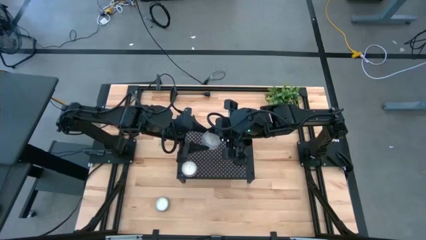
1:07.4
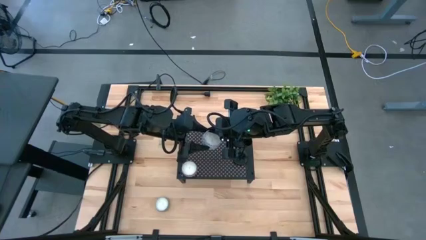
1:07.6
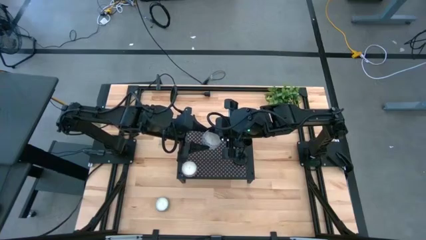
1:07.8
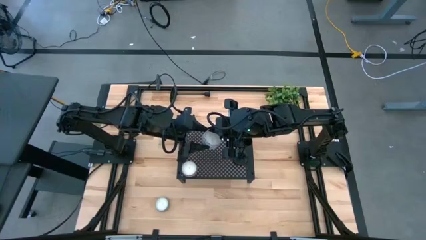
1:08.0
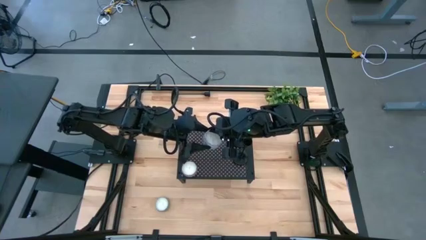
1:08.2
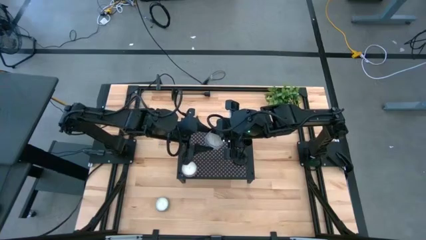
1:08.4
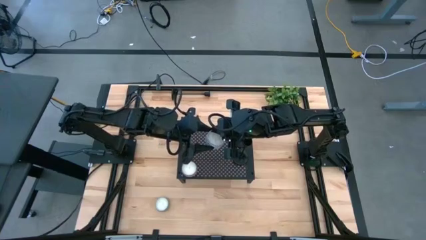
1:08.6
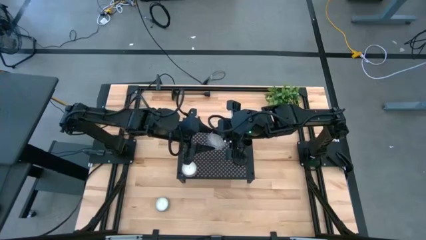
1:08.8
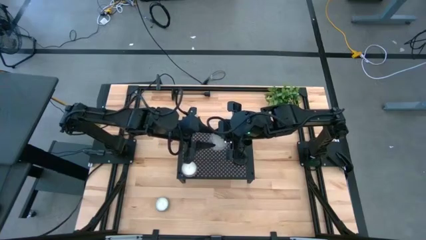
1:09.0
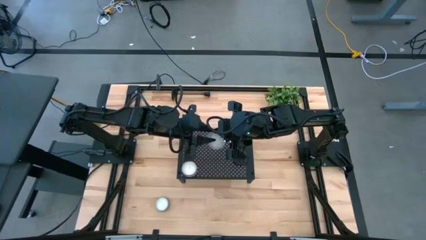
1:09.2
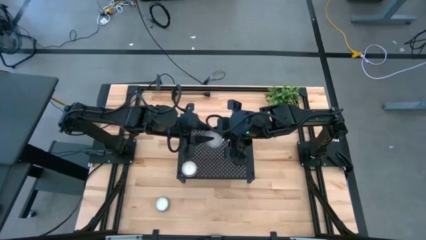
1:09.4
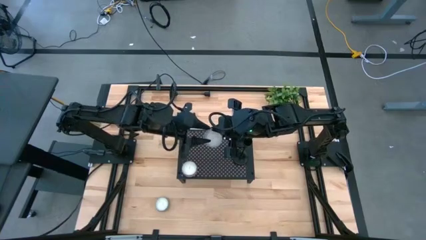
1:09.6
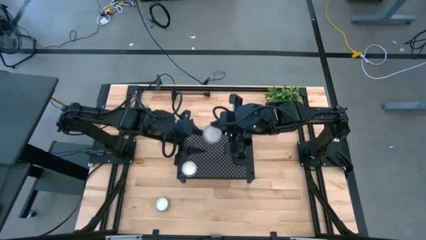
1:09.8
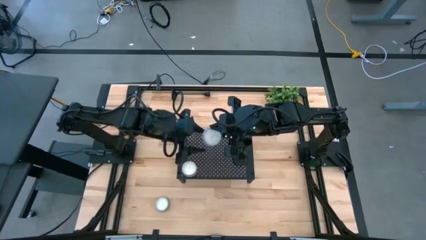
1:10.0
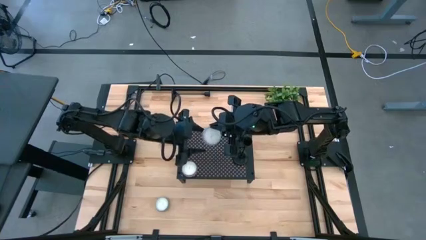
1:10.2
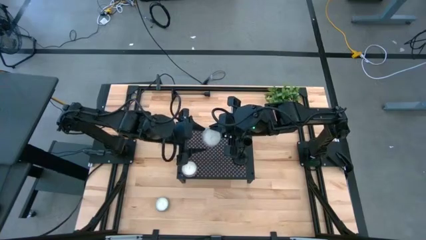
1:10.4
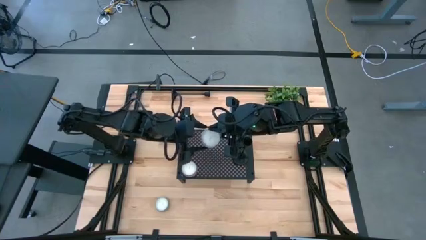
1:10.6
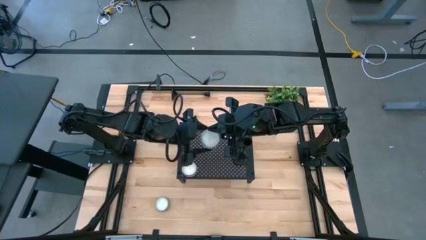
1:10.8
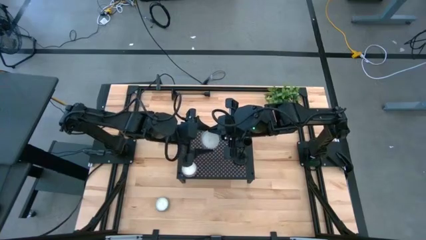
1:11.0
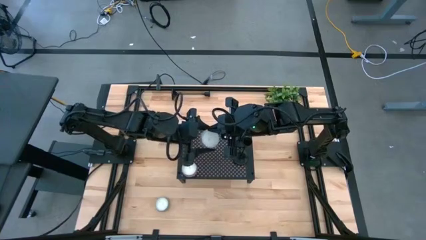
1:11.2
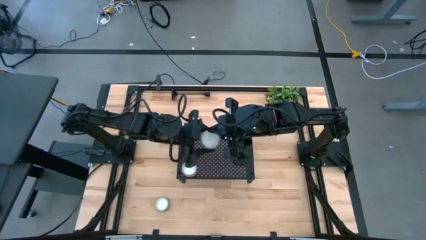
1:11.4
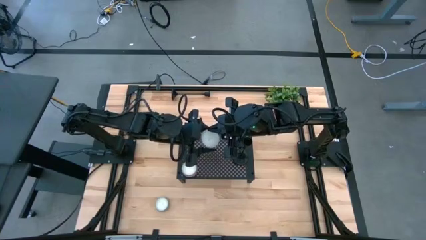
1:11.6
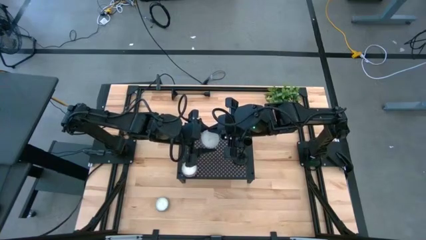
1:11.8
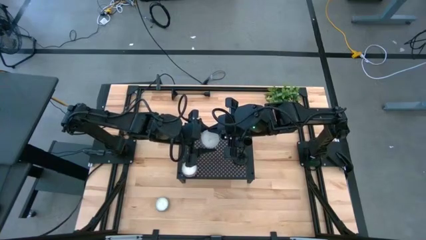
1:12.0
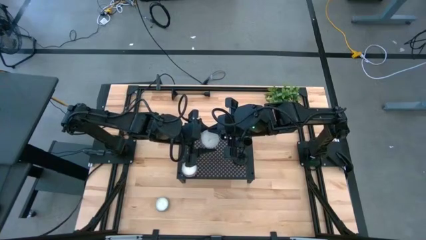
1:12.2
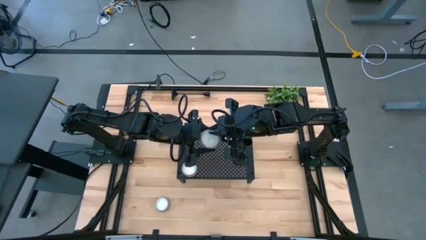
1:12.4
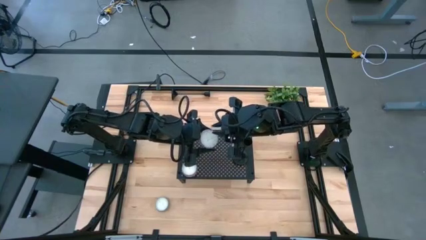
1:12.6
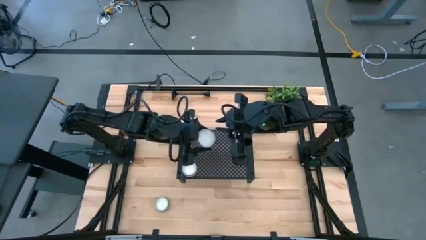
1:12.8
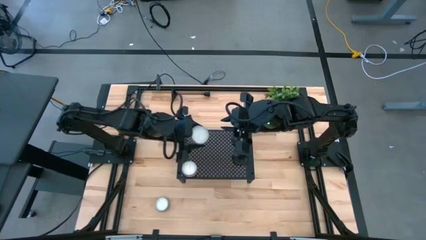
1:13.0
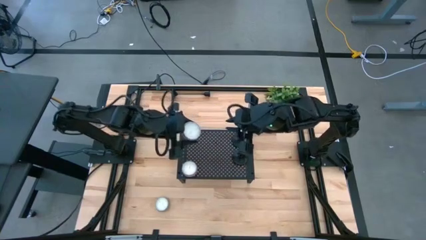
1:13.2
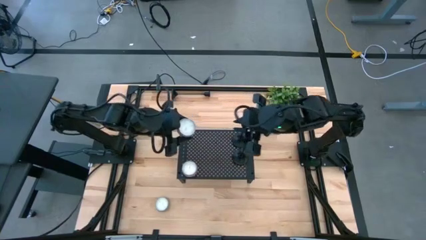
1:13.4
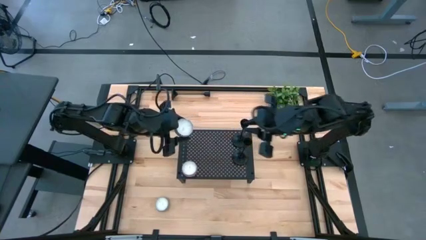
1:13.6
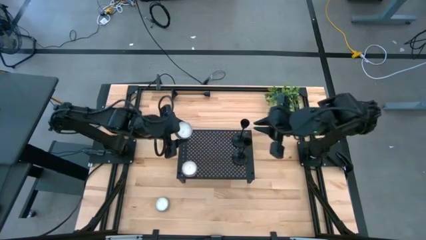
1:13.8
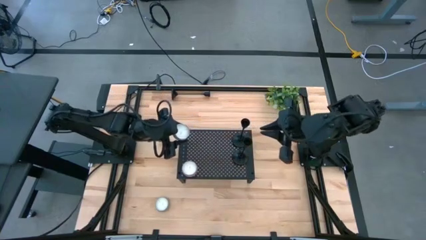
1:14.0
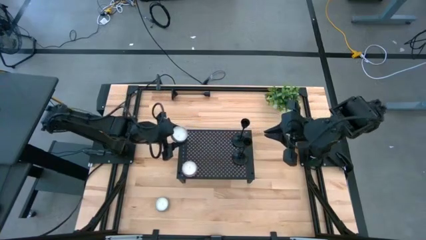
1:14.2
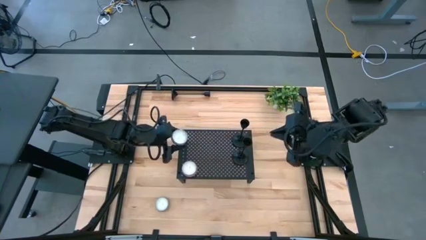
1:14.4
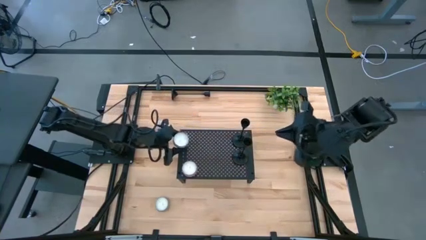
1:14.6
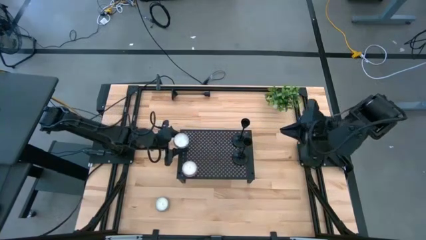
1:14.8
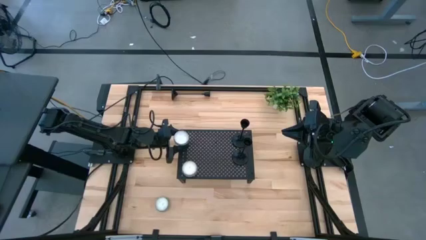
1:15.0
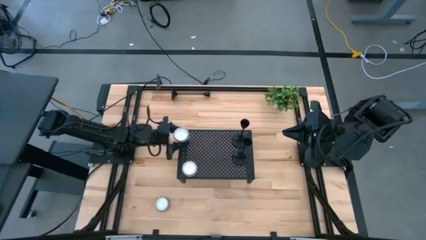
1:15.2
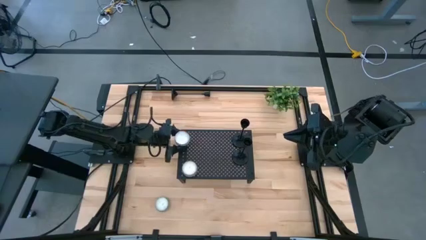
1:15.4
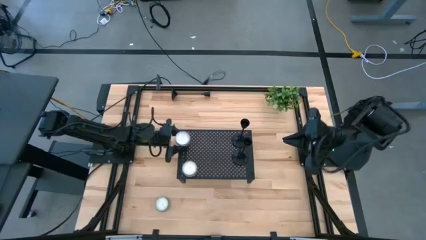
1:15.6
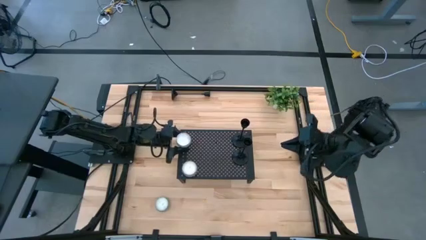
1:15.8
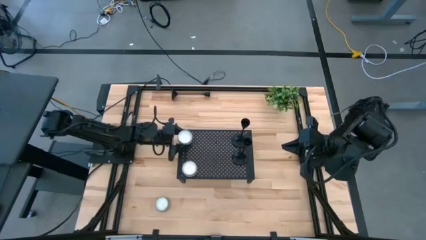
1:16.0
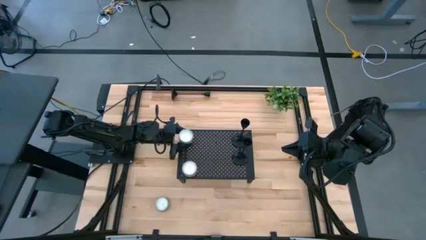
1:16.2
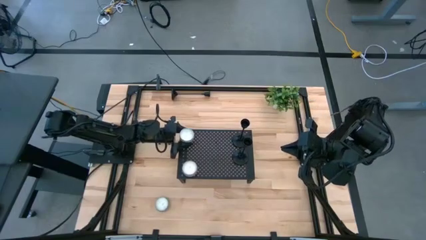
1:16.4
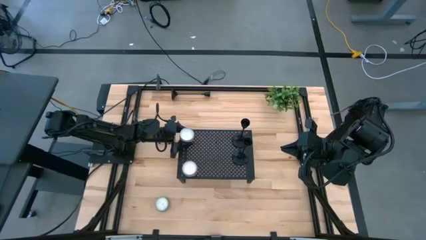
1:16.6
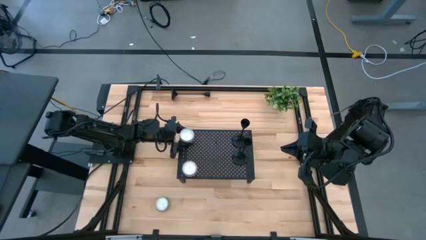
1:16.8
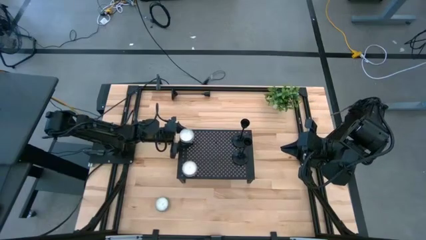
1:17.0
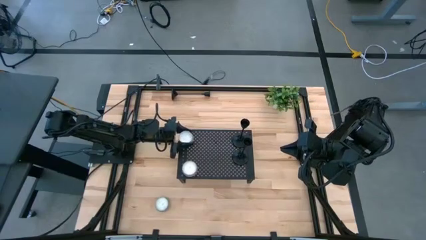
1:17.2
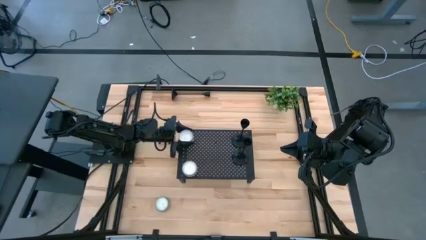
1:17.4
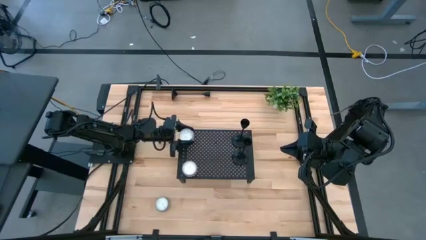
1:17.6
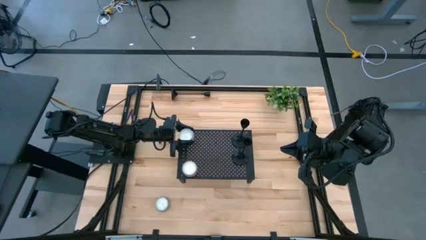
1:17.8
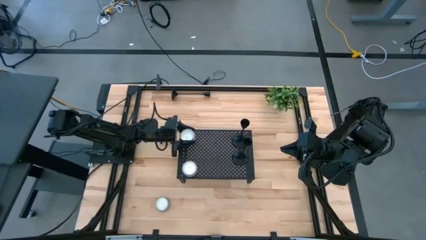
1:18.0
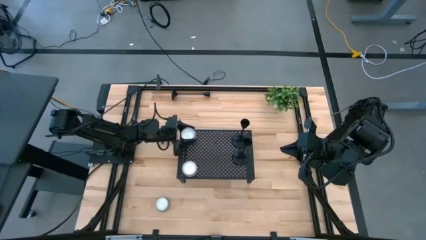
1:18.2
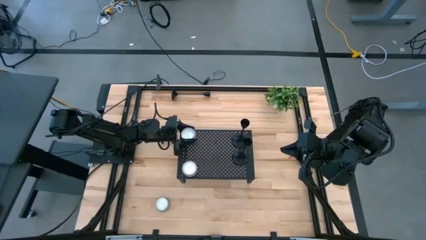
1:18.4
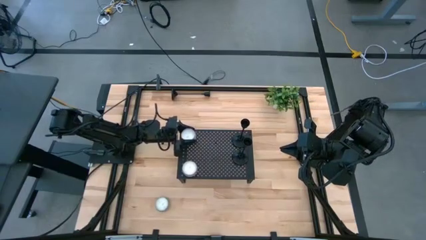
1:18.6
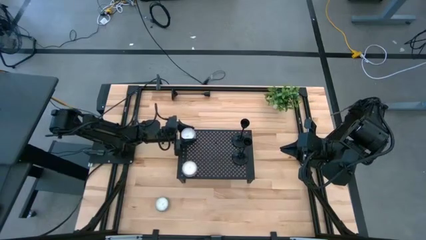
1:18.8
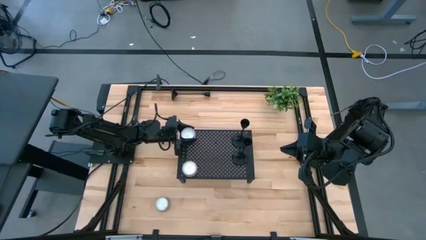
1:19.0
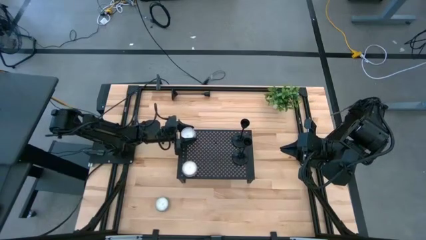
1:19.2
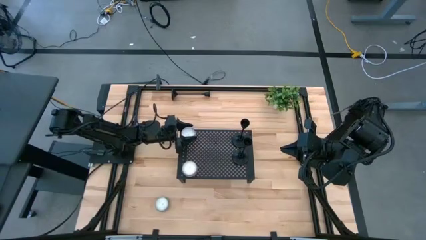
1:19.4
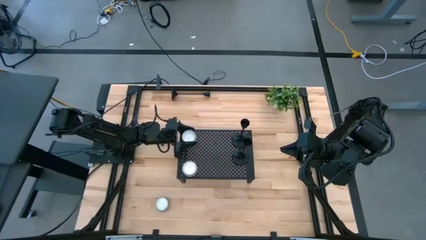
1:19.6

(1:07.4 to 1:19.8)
Task: Pick & Place candle stick holders
Put the red patterned scented candle on the shelf aligned with the other scented candle

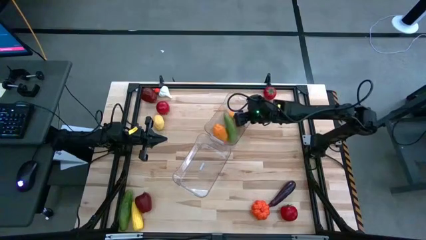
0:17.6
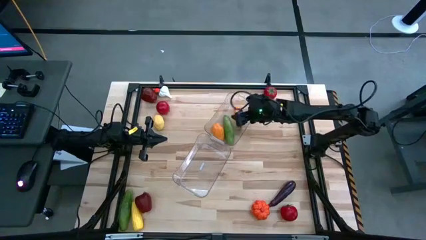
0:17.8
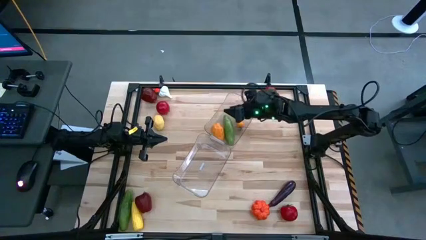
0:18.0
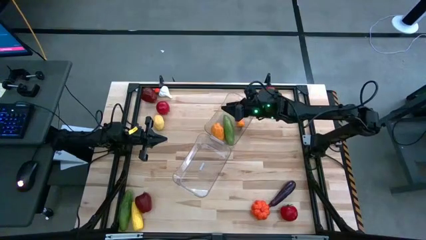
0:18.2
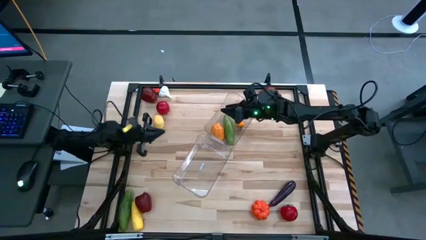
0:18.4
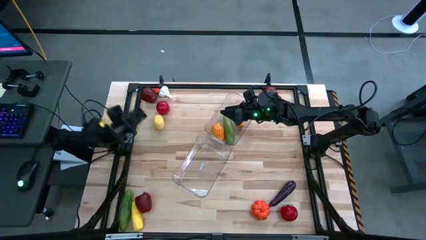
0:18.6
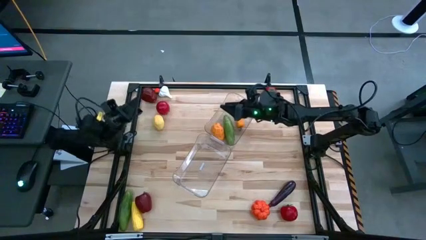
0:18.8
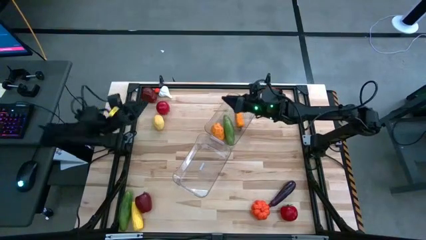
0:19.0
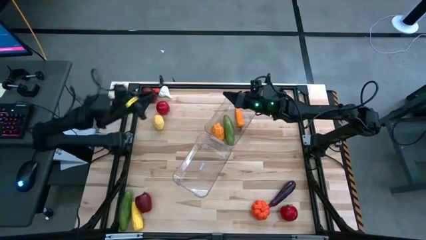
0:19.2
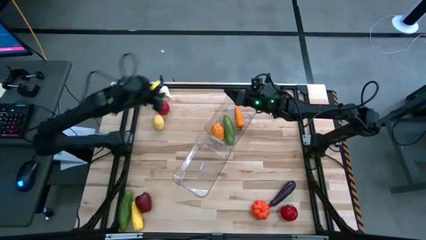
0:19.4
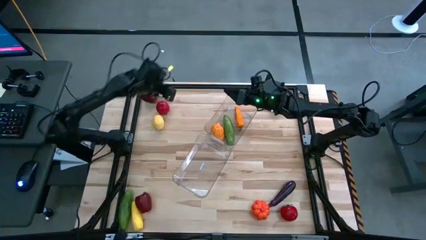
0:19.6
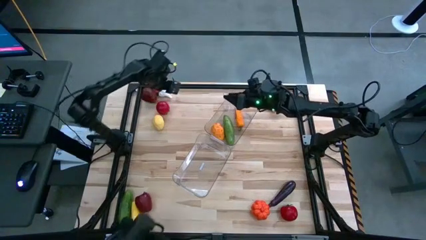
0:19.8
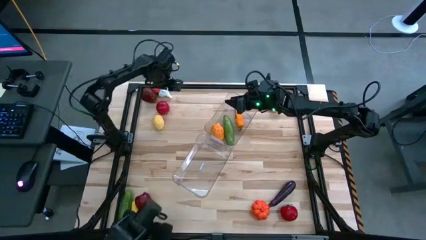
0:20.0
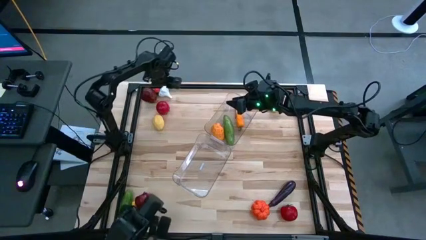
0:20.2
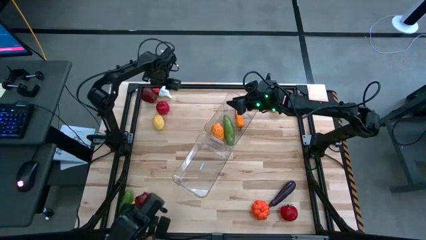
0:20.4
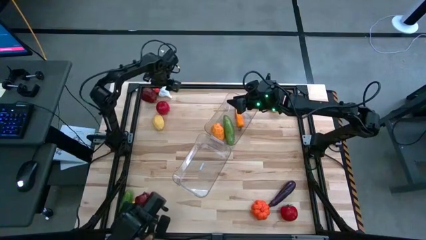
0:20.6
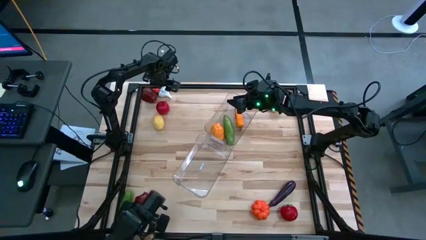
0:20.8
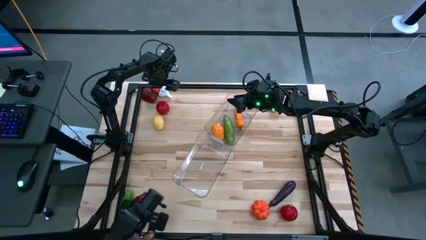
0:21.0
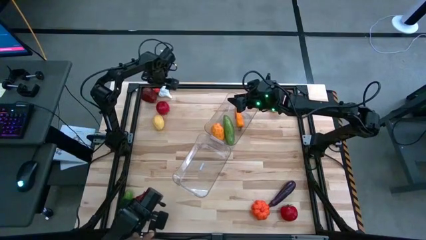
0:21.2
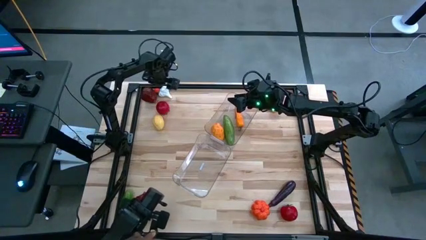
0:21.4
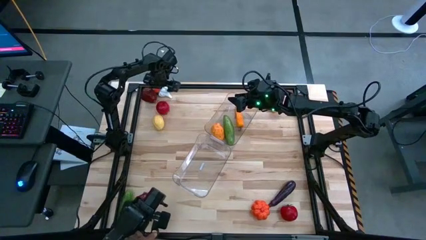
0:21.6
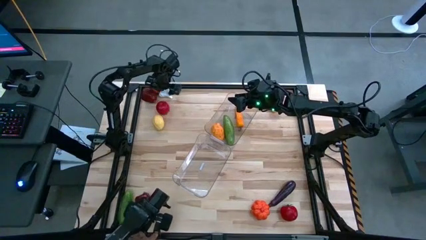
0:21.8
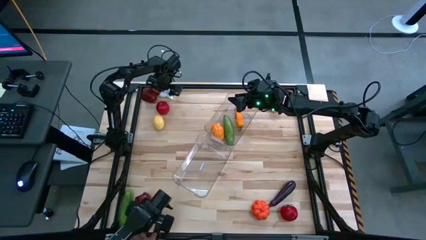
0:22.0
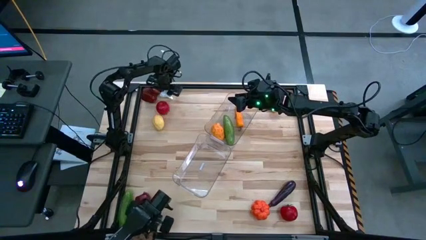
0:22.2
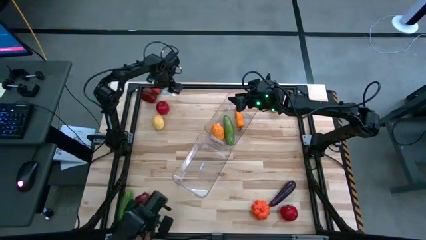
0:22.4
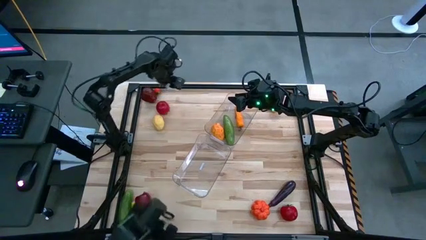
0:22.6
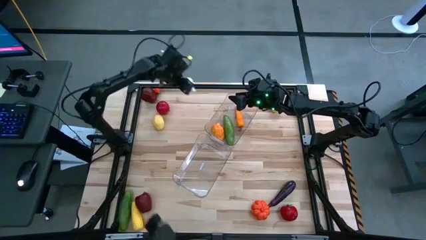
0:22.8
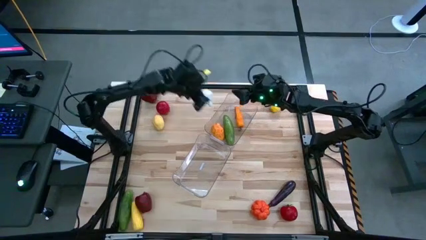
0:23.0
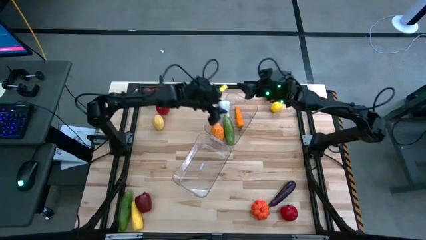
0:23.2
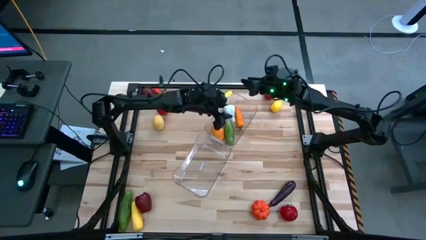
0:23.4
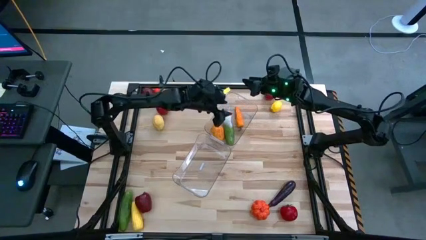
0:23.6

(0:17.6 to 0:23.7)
Task: Sort produce into baskets
Put the white garlic into the top transparent bin
